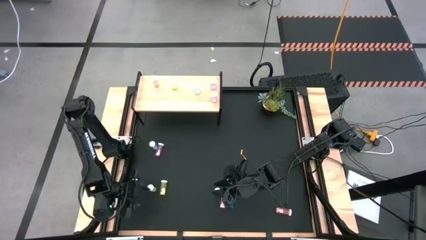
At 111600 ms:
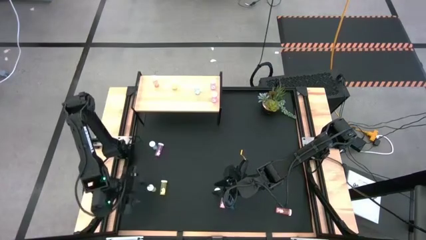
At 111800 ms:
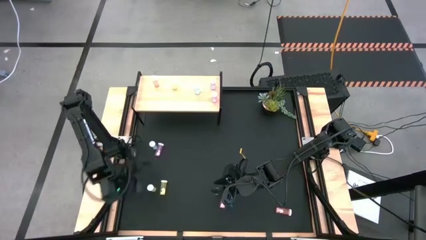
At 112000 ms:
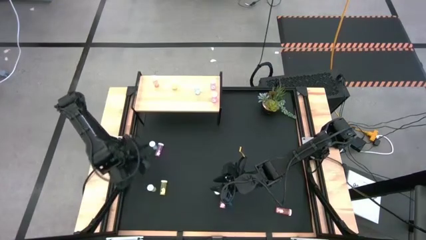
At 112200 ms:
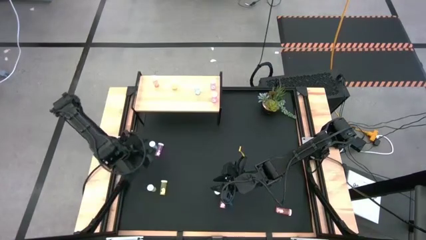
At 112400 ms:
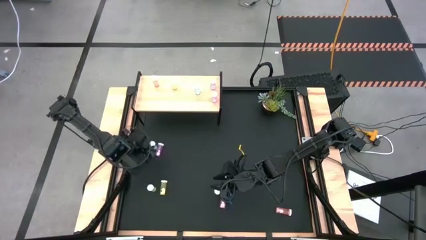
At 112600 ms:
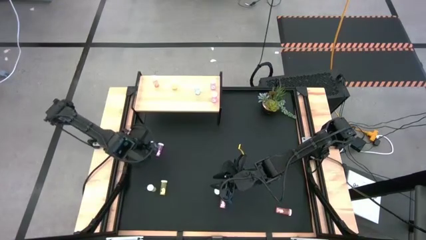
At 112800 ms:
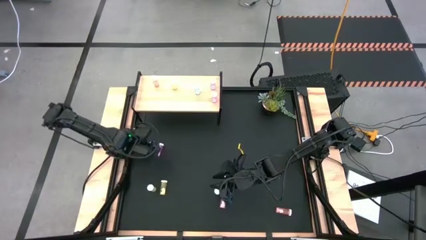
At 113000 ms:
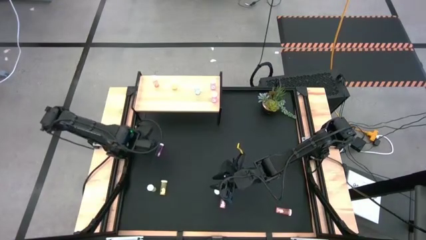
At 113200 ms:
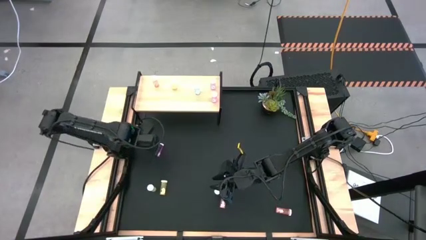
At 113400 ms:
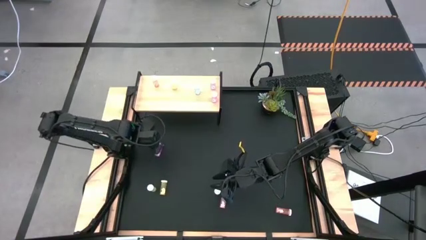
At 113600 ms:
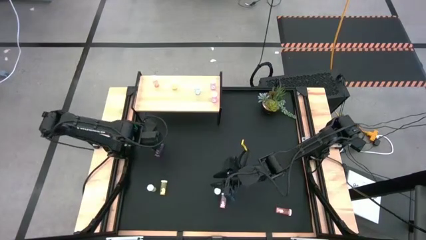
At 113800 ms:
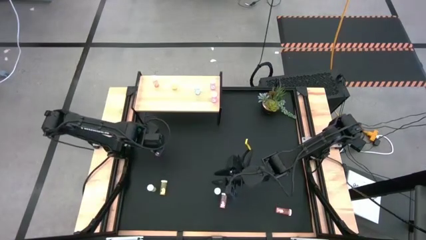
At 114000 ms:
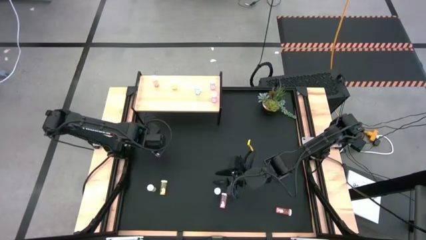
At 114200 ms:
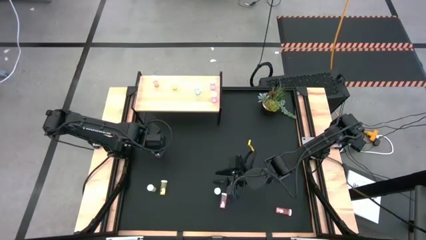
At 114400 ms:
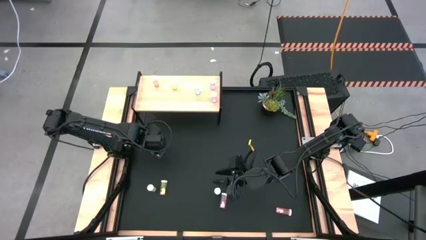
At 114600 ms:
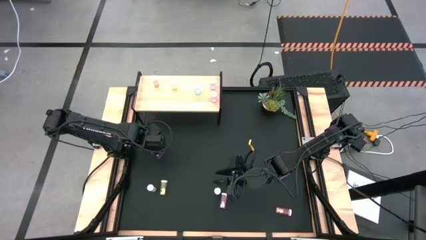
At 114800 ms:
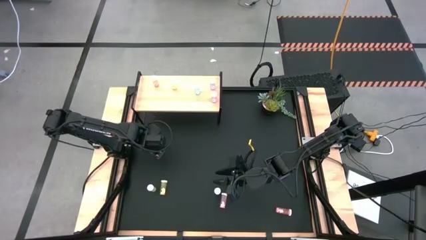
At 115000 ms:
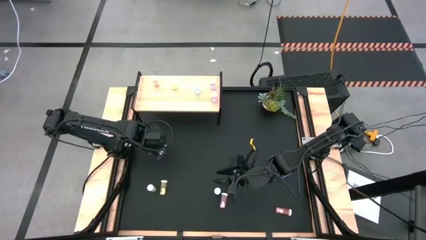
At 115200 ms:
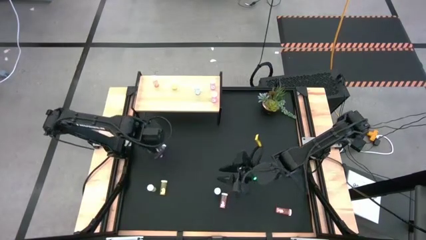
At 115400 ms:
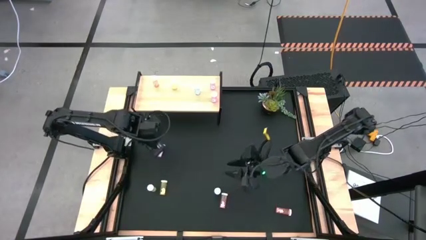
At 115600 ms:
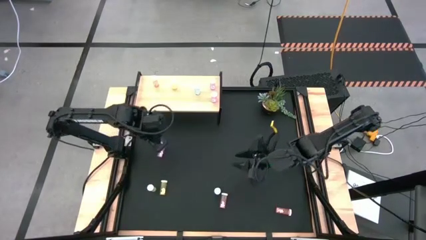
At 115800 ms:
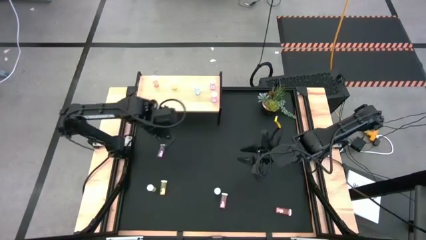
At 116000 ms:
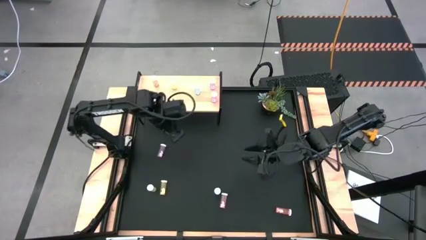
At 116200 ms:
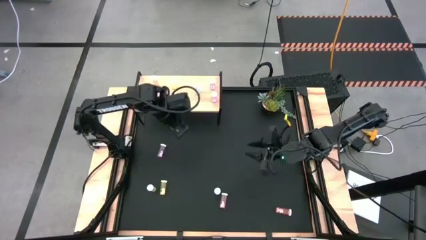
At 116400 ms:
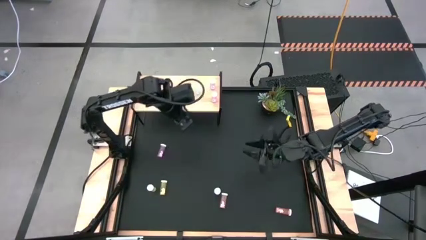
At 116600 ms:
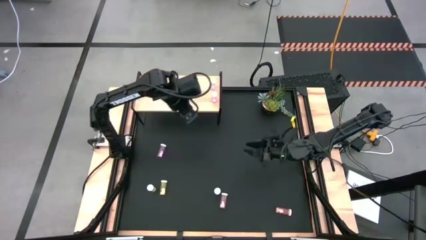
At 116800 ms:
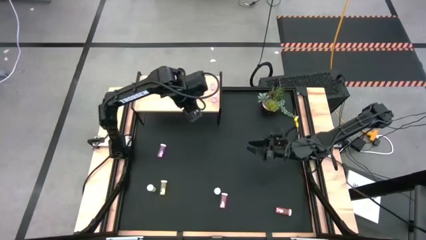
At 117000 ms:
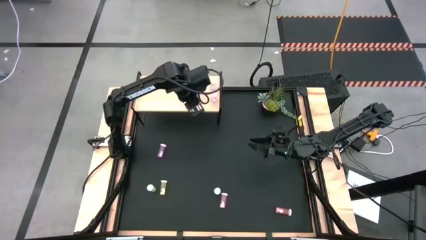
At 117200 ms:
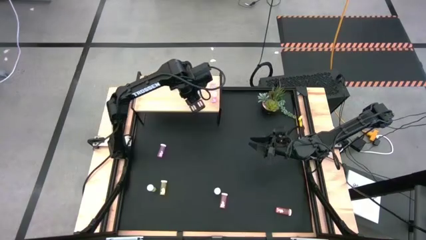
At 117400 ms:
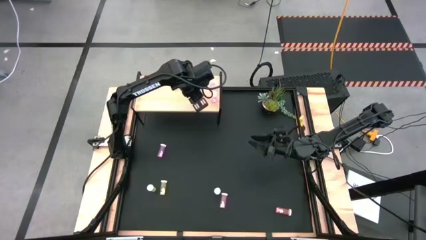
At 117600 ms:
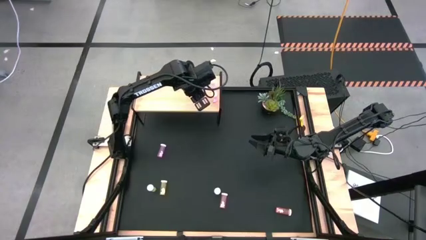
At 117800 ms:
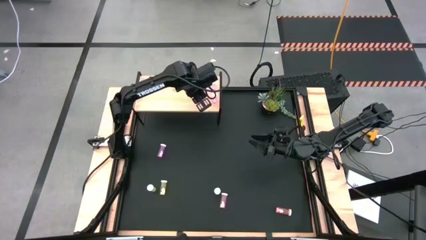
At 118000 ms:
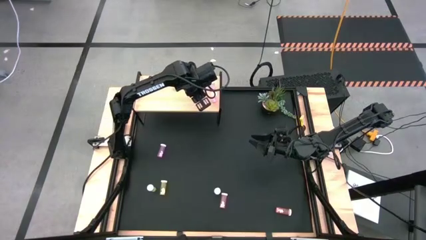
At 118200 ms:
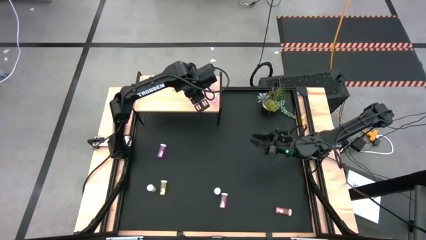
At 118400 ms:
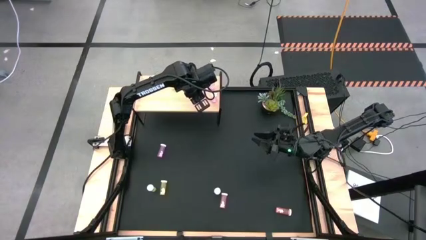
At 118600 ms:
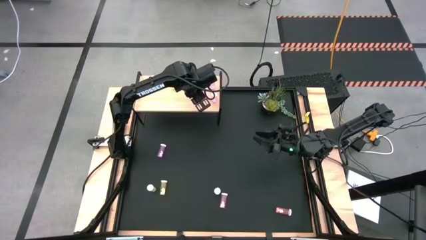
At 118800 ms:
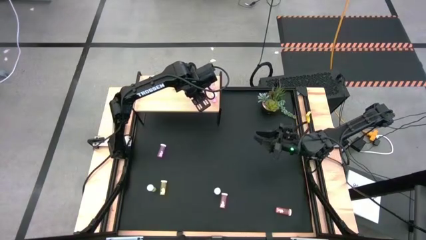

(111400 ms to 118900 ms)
Task: Pick and place medicine bottles onto shelf by color
Put the top blue pill bottle on the shelf aligned with the other blue pill bottle

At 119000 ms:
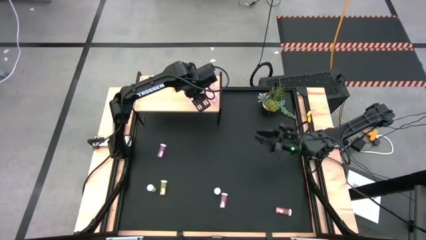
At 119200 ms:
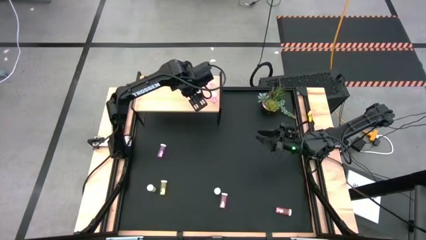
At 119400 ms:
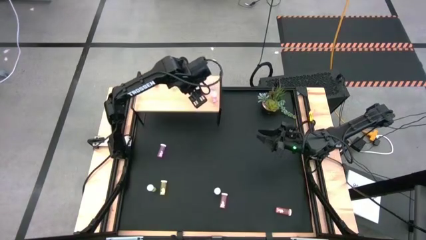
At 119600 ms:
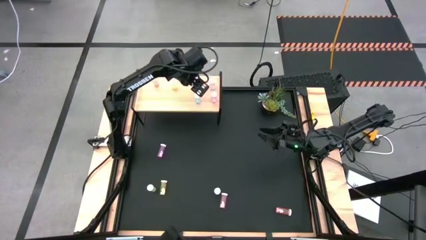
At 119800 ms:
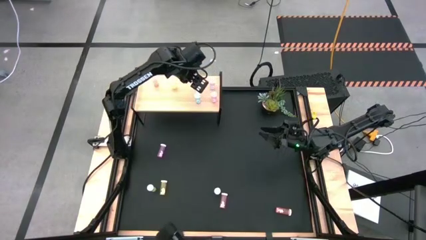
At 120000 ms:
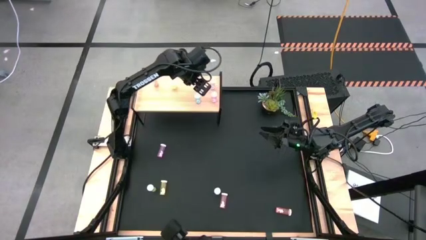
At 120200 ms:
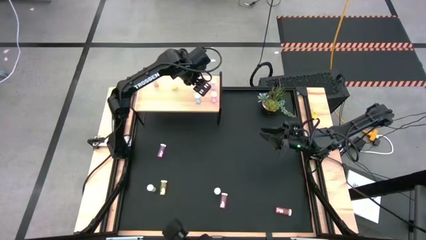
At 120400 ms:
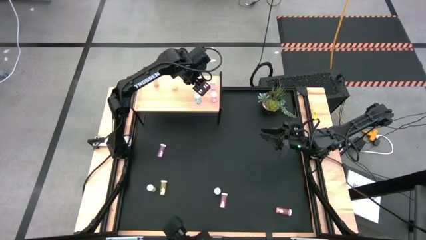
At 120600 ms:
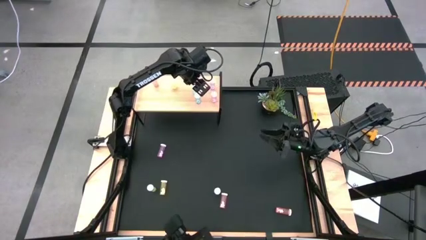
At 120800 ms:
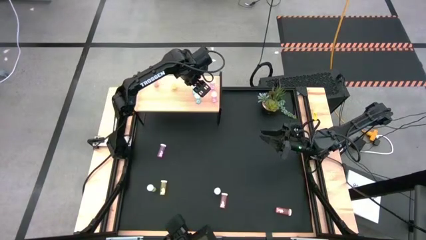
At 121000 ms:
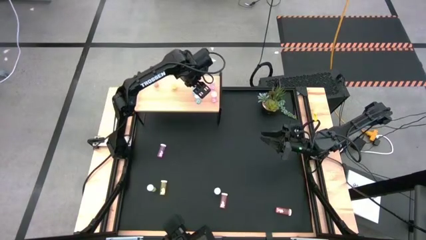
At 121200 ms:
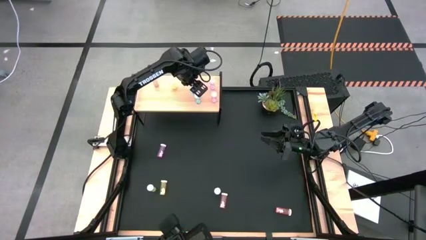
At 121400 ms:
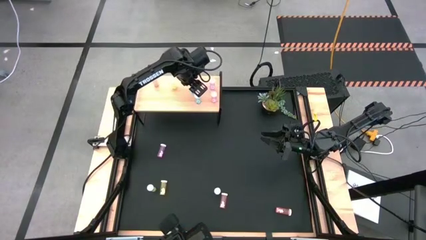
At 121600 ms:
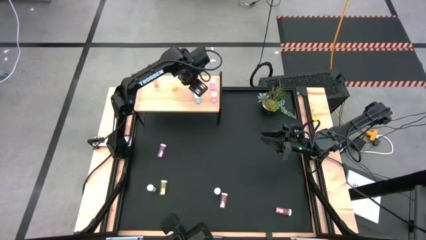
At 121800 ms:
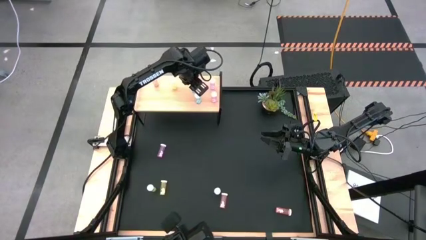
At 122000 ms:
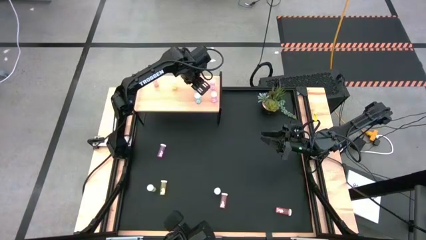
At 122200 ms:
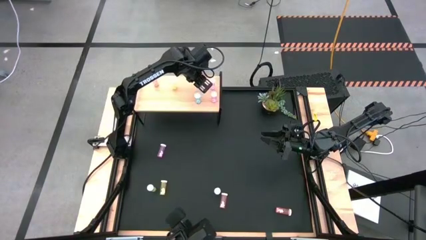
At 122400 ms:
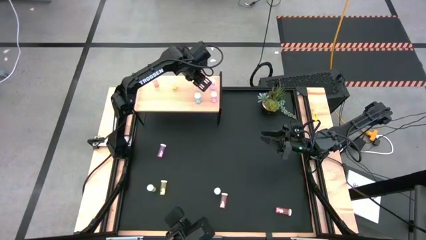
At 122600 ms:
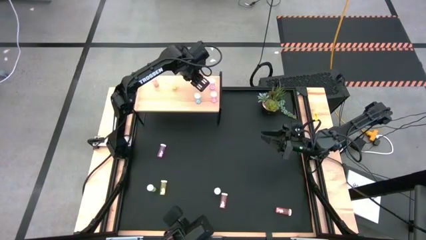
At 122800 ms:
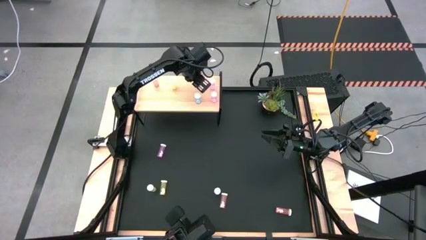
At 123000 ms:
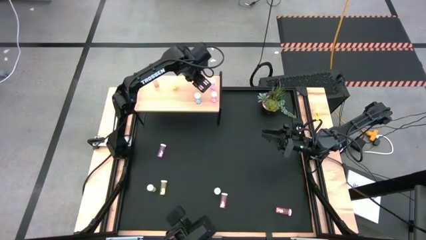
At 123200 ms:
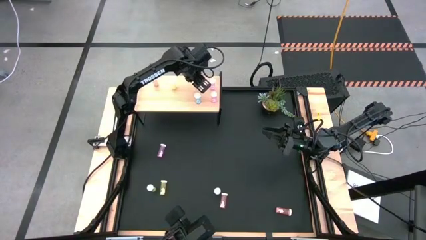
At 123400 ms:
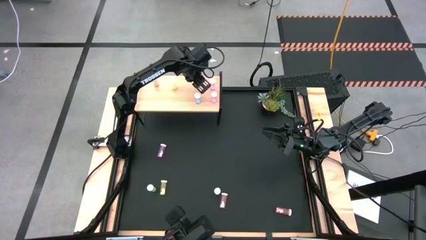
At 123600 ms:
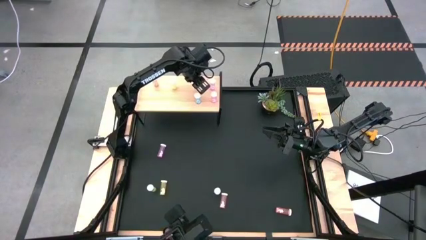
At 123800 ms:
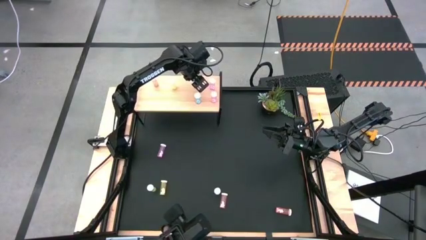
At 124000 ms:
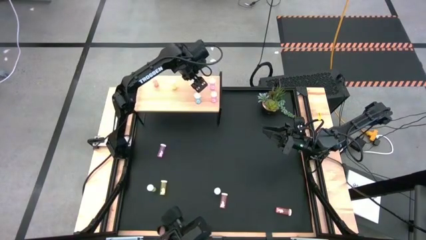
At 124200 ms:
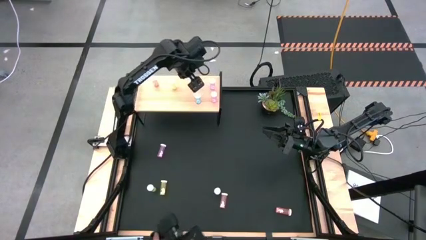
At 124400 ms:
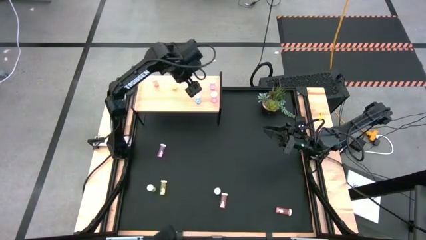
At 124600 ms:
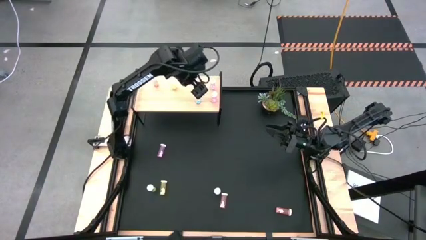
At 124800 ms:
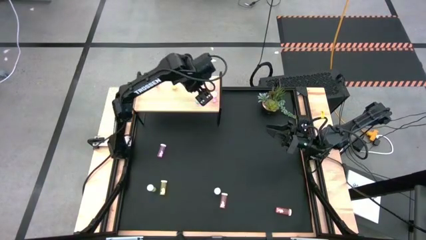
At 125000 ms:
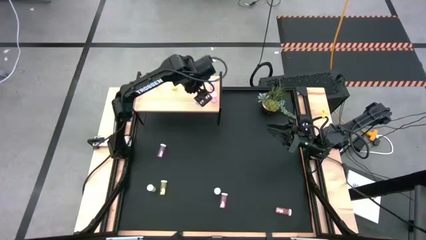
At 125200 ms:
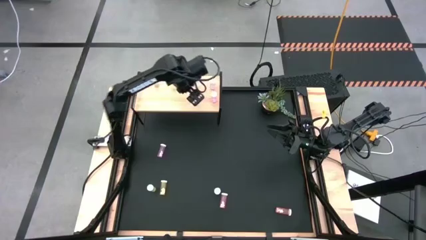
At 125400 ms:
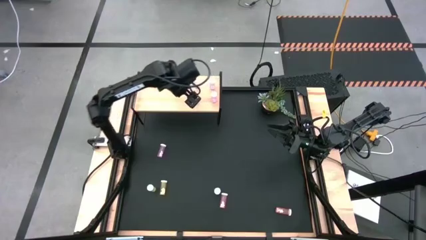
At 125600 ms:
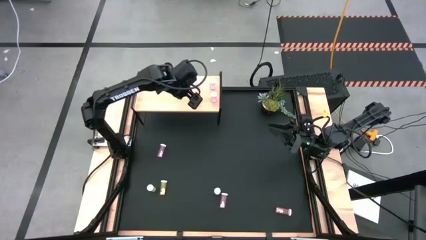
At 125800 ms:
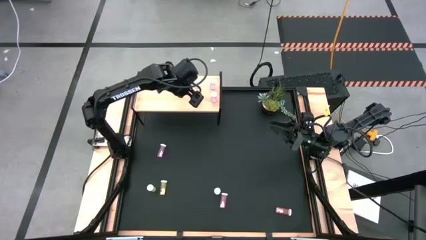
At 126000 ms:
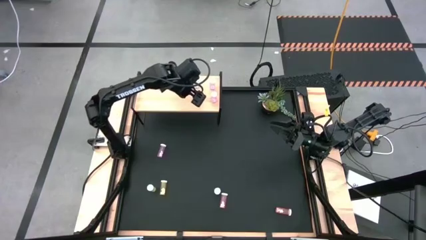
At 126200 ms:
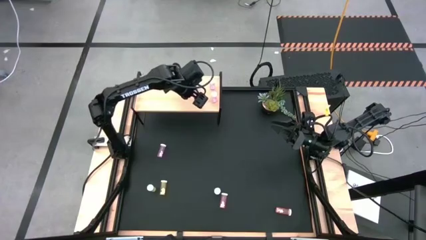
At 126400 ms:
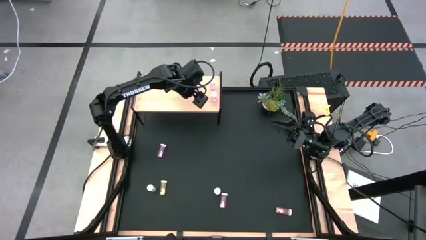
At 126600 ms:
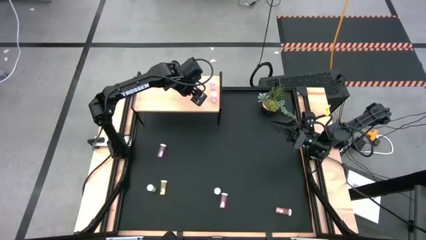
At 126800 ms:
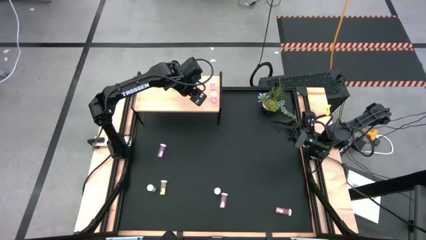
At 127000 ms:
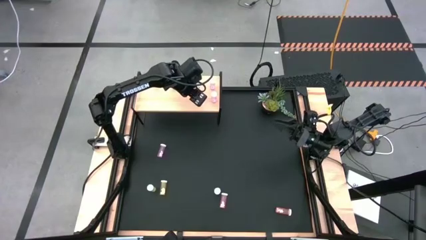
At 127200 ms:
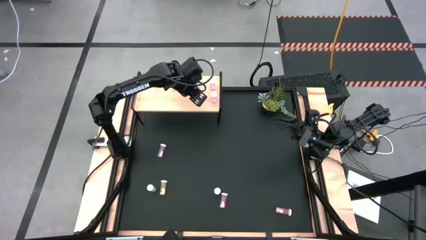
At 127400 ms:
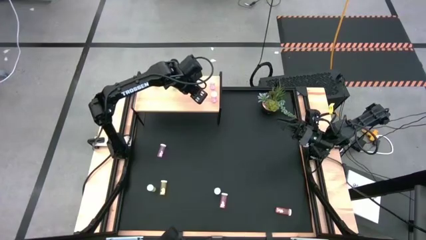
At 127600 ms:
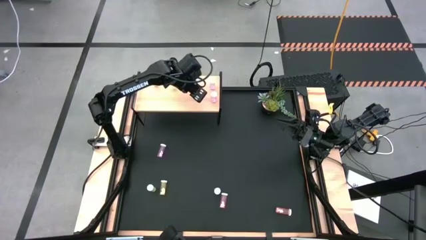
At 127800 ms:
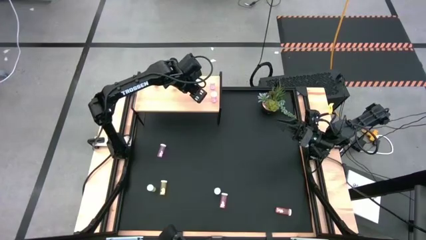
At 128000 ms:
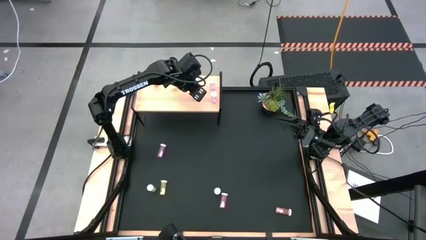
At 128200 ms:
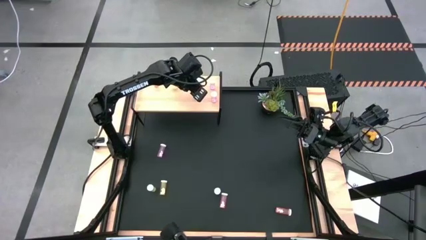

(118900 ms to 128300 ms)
Adjust the blue pill bottle on the shelf
